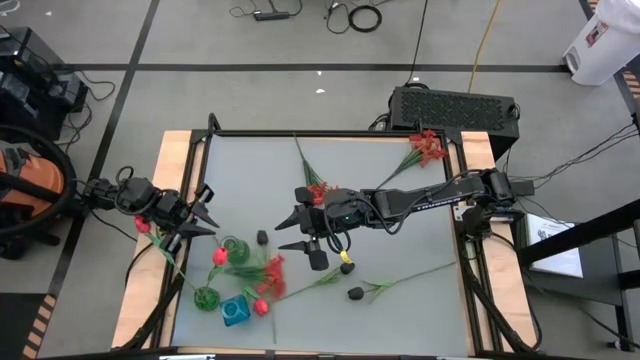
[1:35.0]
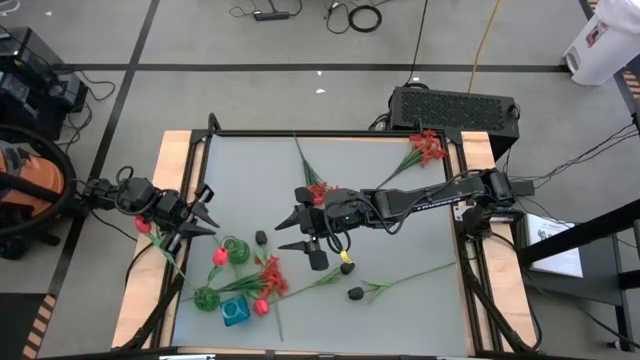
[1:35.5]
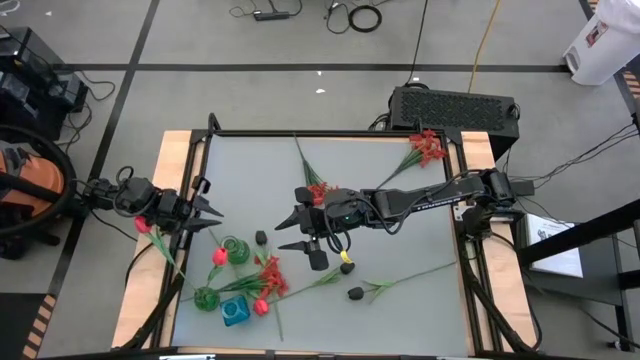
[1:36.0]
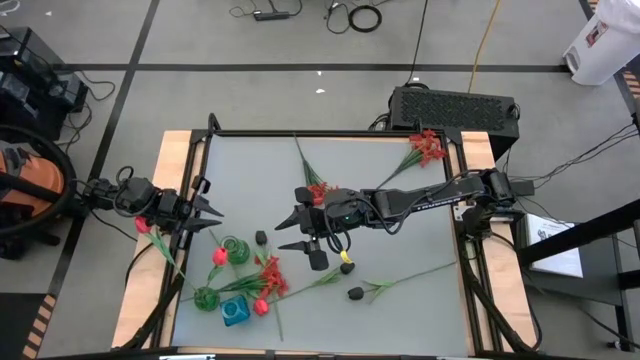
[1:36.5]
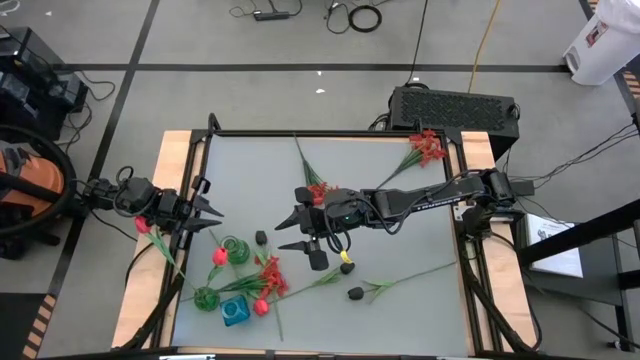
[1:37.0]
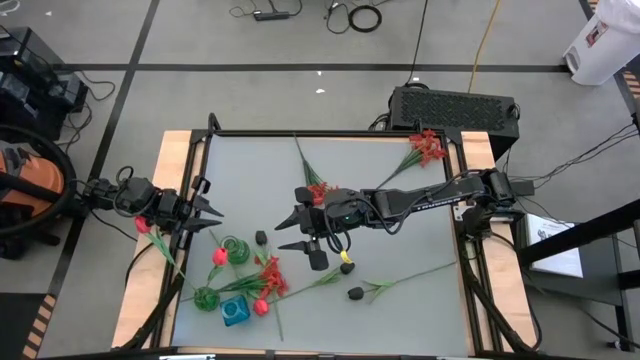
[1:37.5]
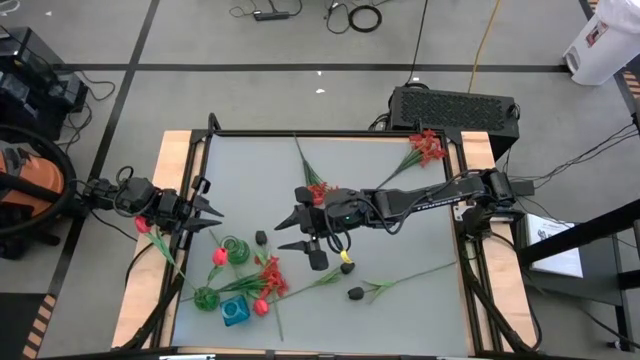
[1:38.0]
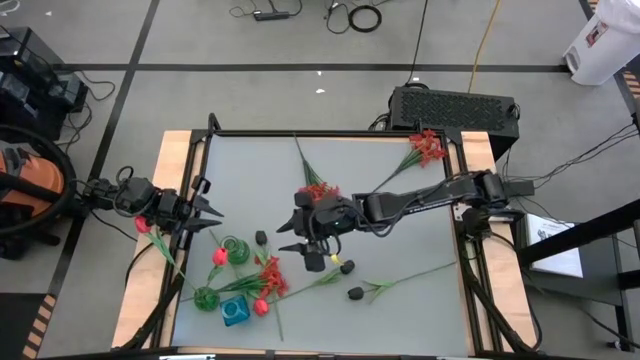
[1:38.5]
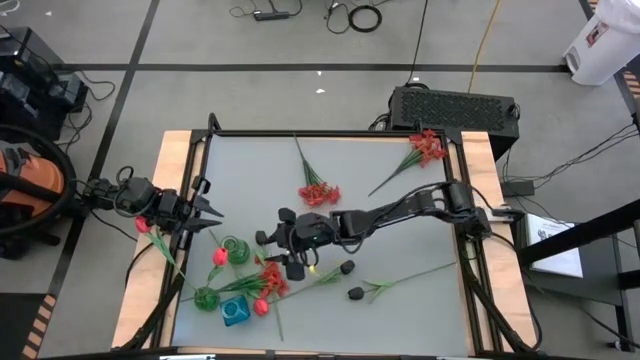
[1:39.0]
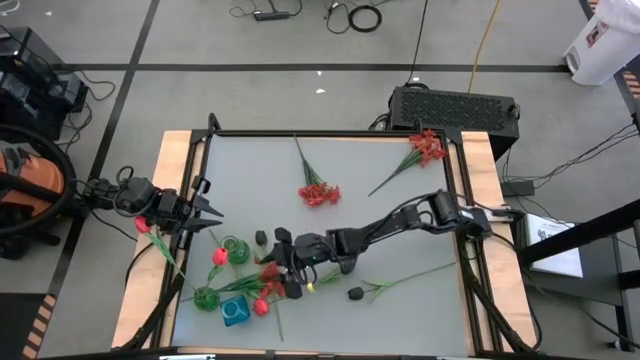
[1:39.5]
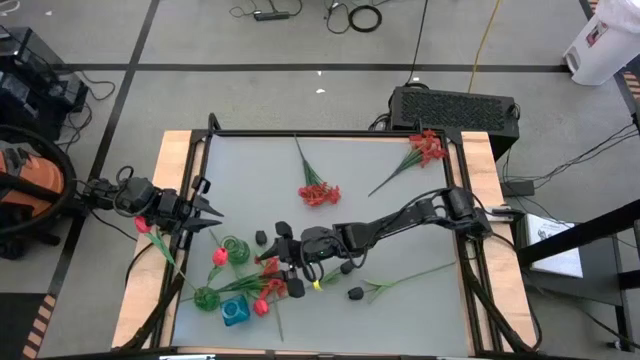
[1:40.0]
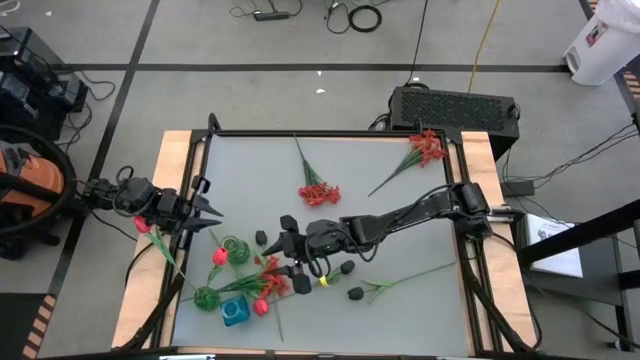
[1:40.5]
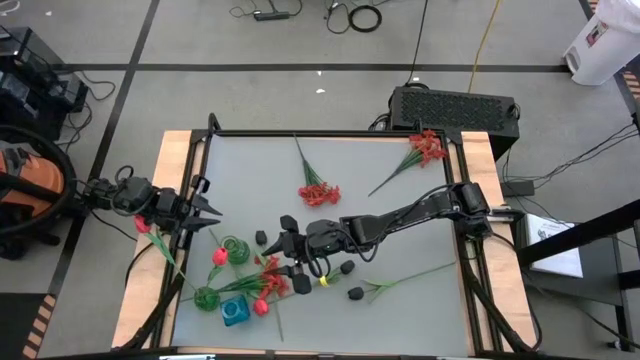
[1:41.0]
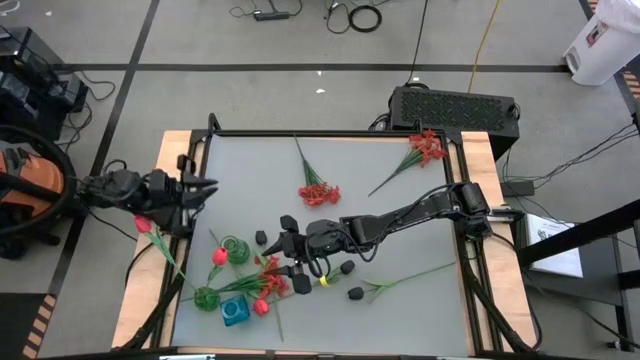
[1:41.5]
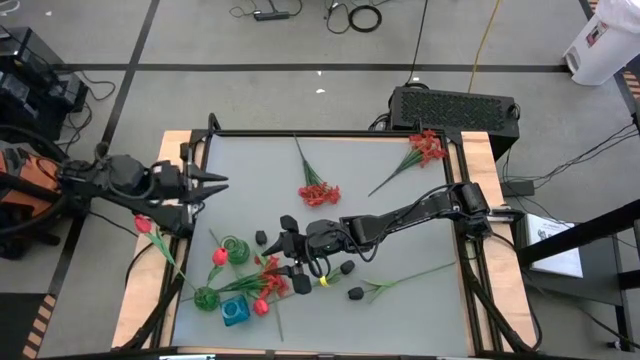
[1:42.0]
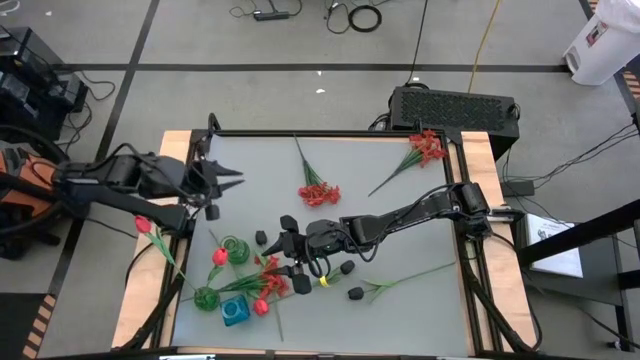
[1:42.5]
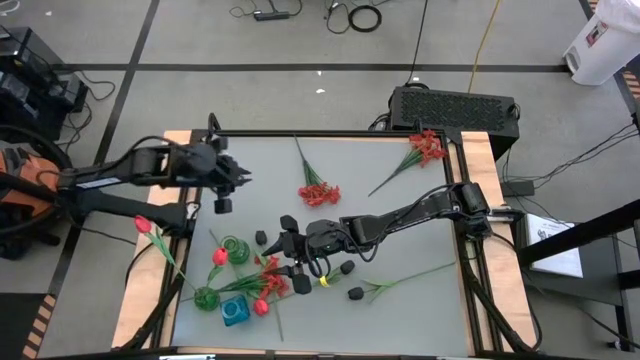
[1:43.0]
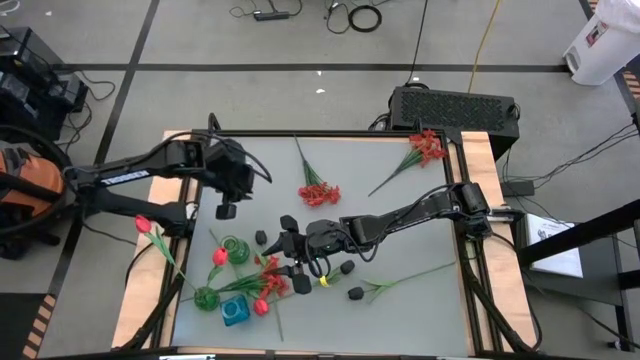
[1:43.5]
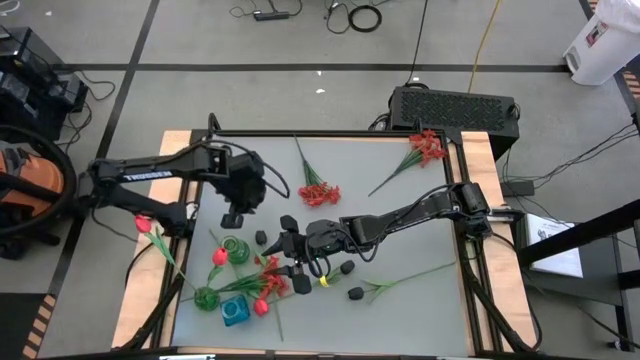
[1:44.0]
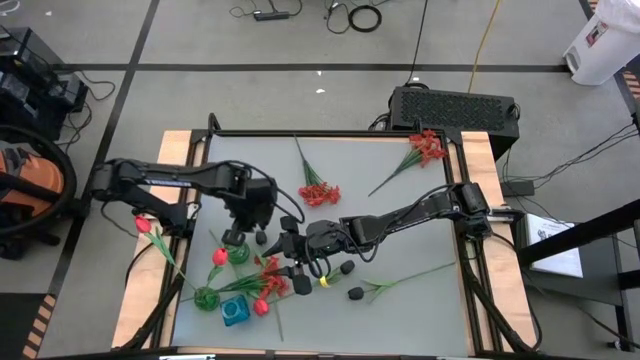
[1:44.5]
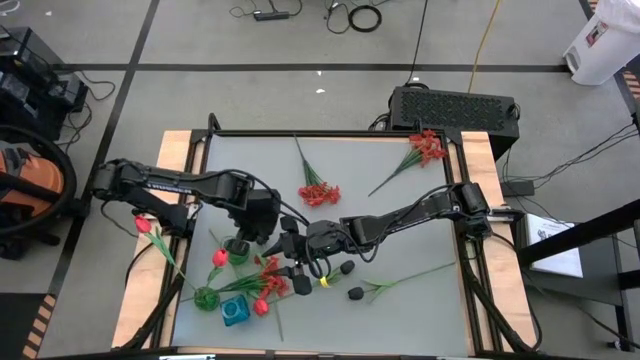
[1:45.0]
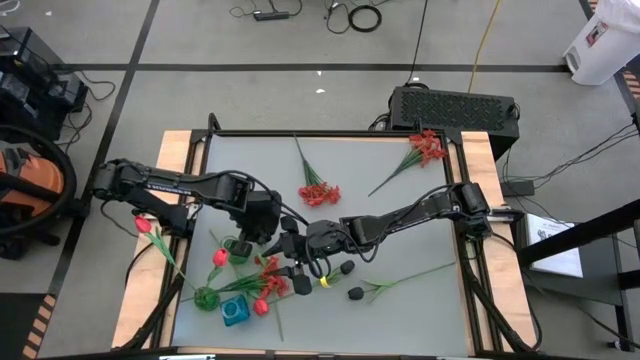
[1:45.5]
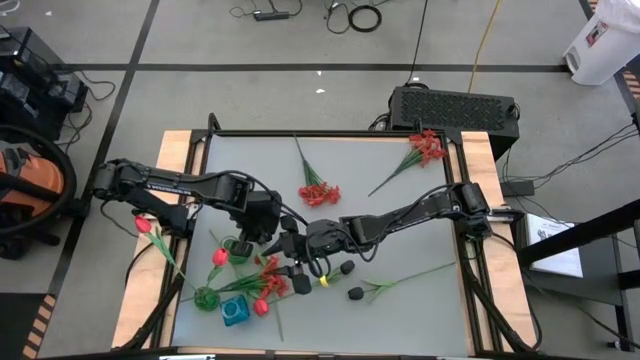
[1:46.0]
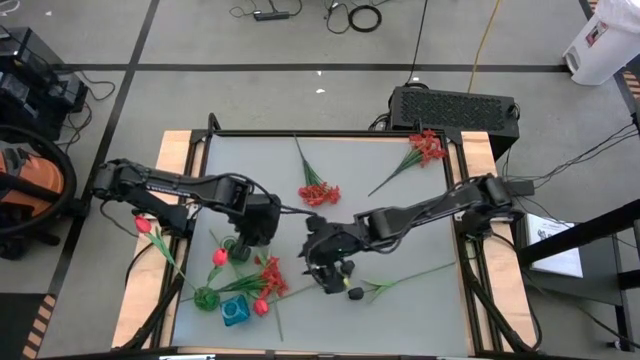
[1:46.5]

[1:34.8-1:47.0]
Task: Sort flowers into vase by color
Put the bottom orange flowers into the top green vase

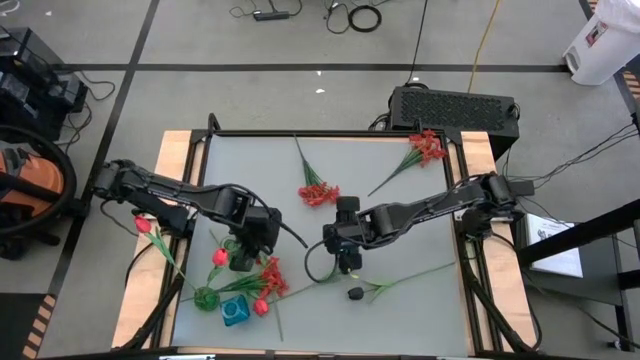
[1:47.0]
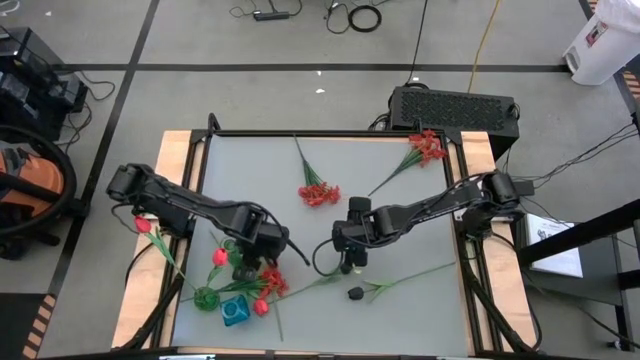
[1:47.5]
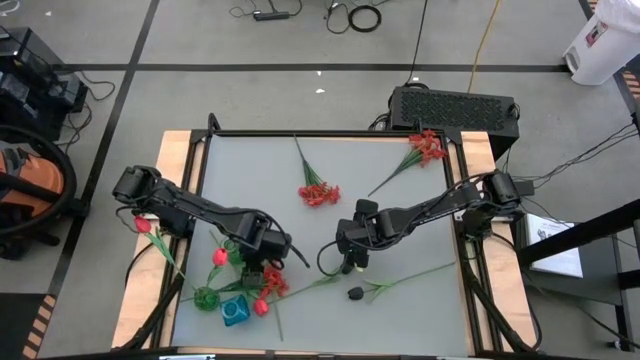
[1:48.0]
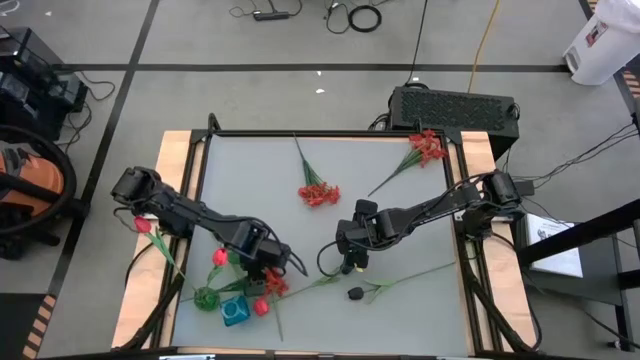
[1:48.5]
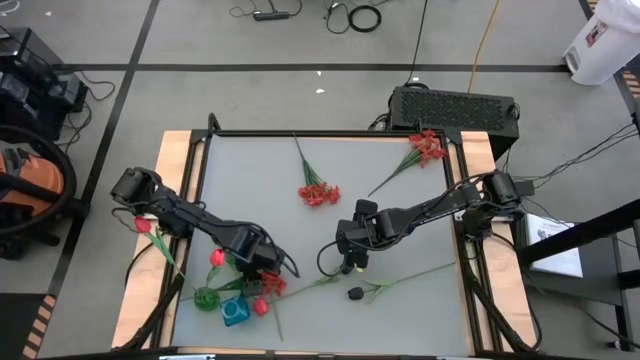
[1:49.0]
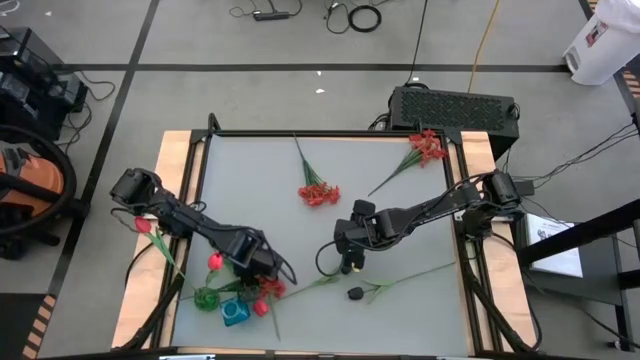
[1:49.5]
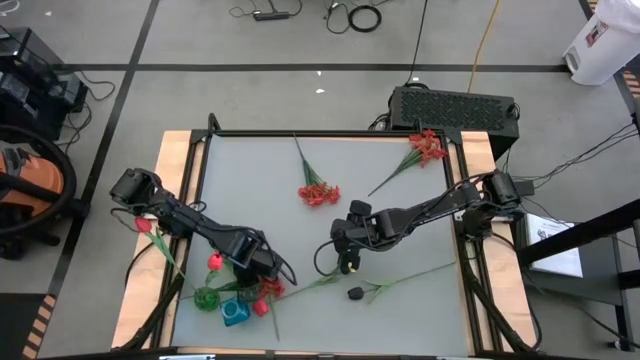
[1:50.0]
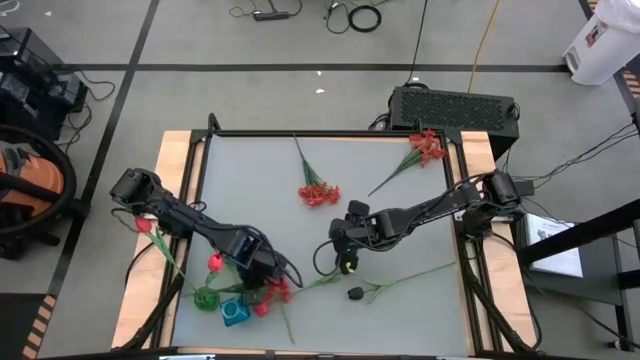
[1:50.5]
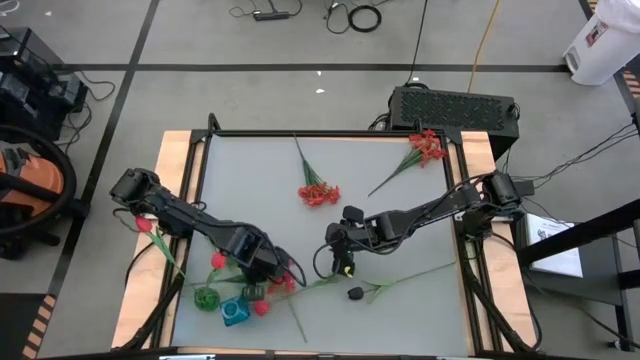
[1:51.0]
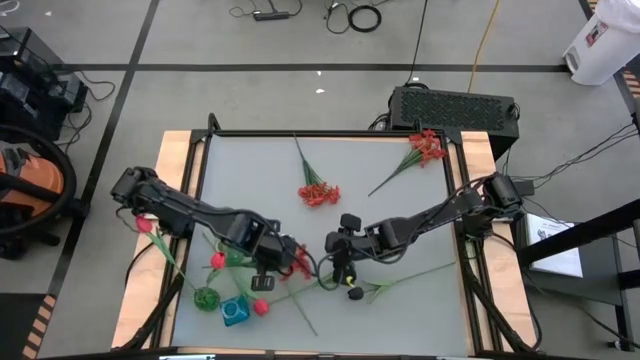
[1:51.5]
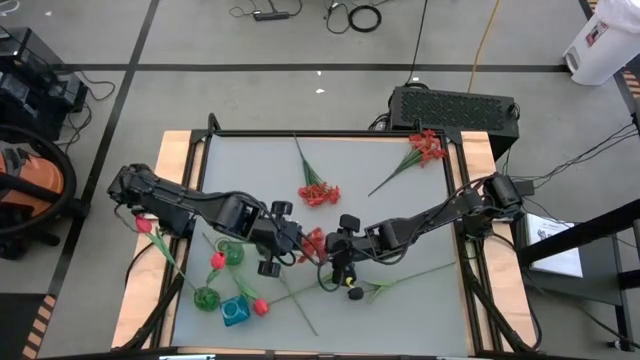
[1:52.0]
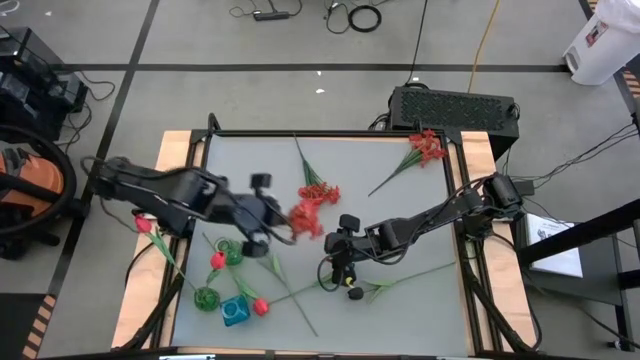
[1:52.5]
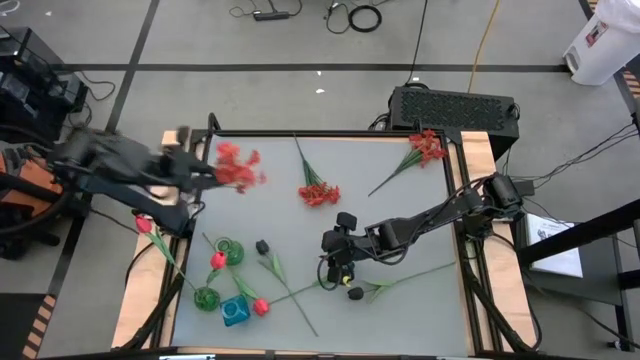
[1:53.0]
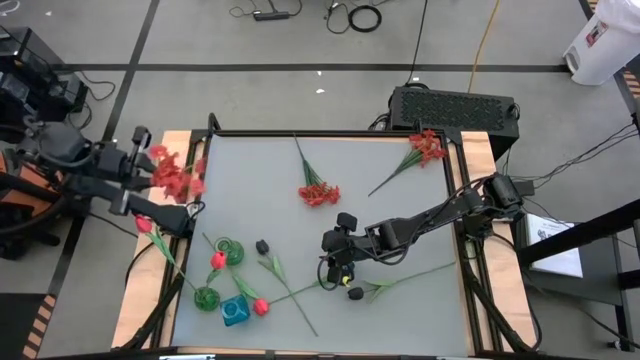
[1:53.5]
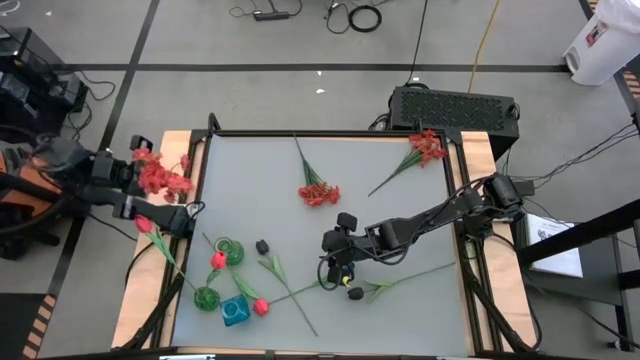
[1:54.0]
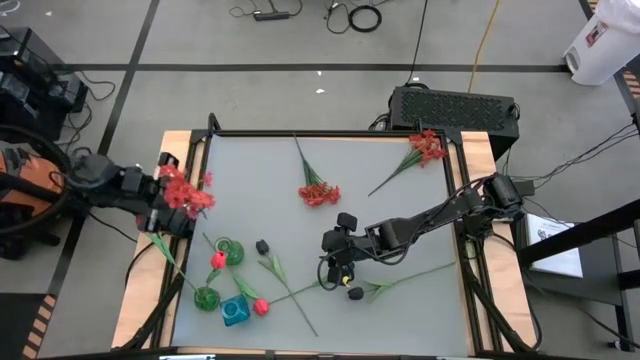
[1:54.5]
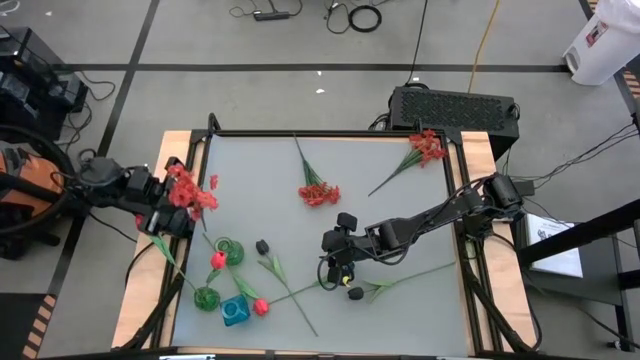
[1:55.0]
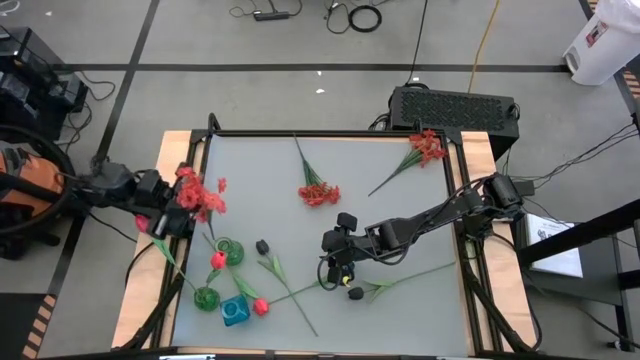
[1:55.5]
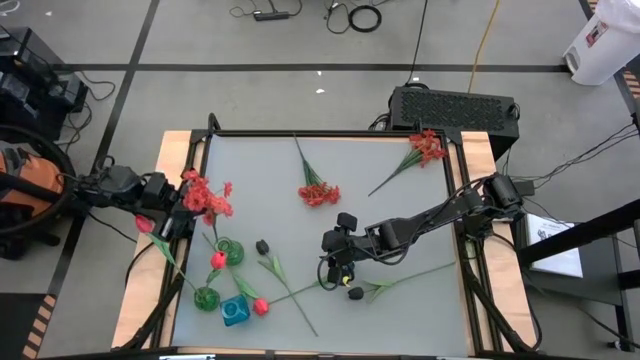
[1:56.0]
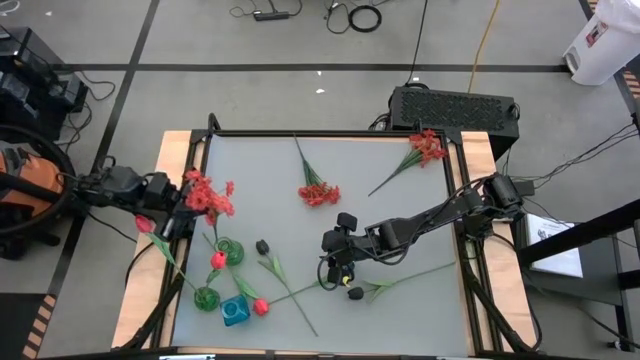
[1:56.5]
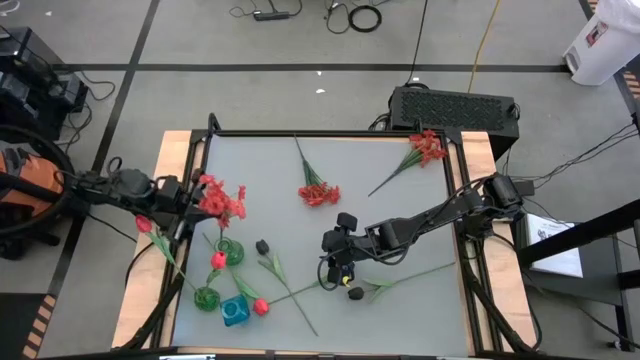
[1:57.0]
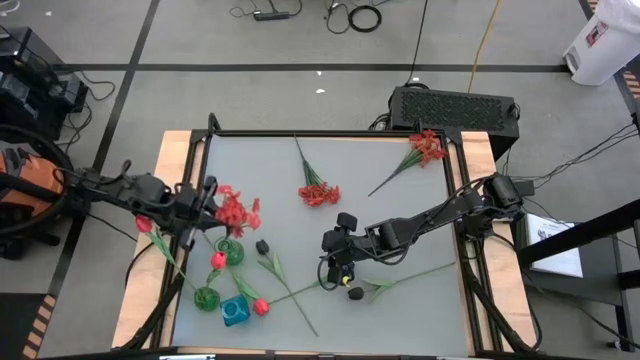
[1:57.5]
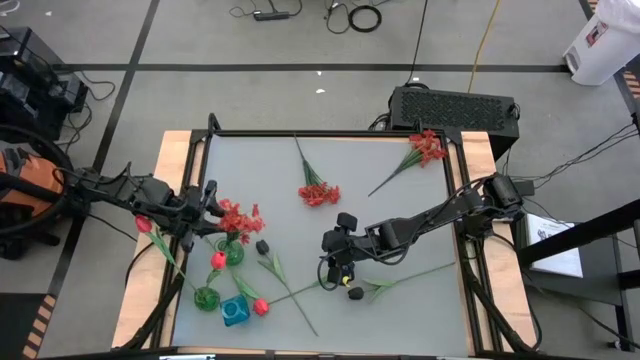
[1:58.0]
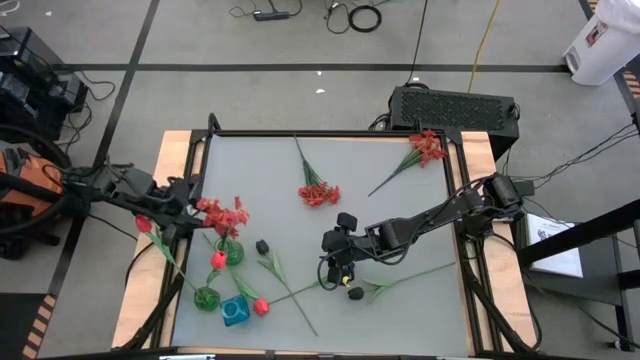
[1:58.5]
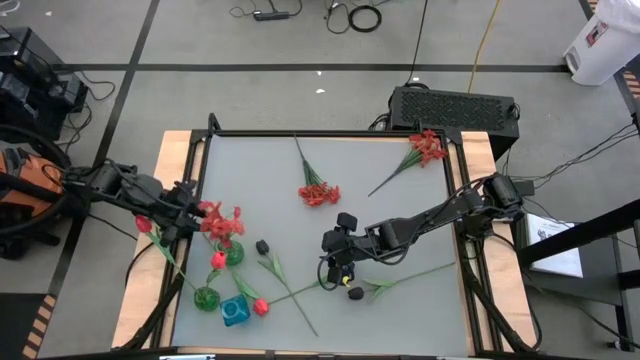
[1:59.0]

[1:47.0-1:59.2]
Put the bottom orange flowers into the top green vase
